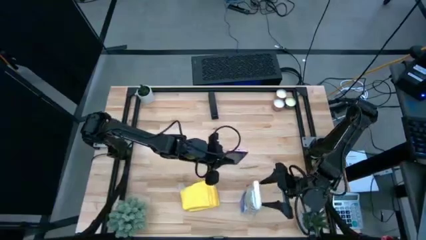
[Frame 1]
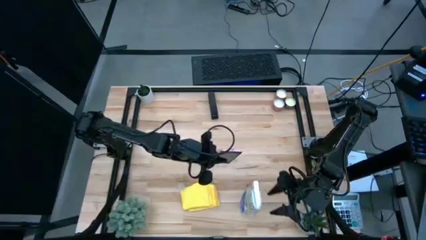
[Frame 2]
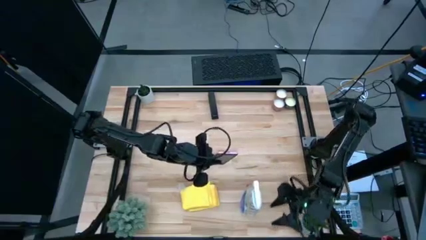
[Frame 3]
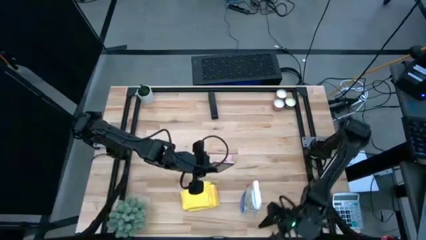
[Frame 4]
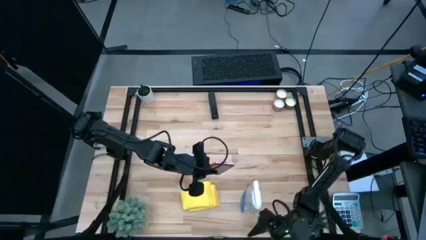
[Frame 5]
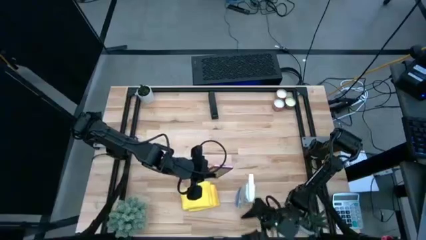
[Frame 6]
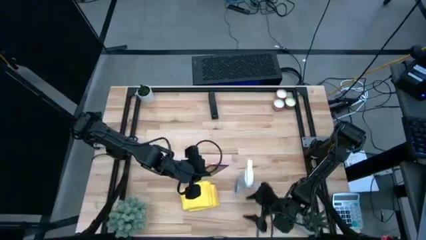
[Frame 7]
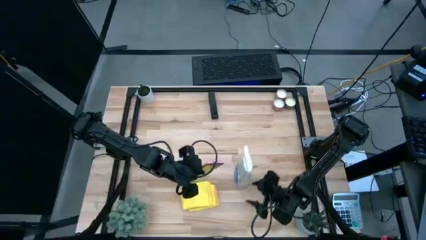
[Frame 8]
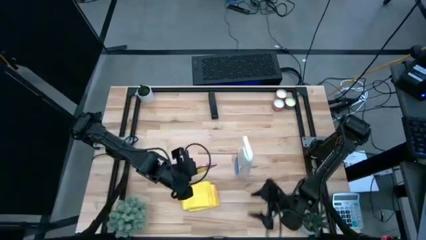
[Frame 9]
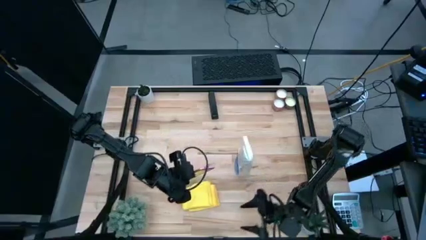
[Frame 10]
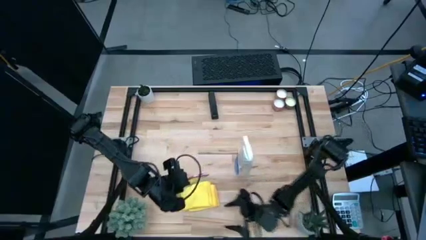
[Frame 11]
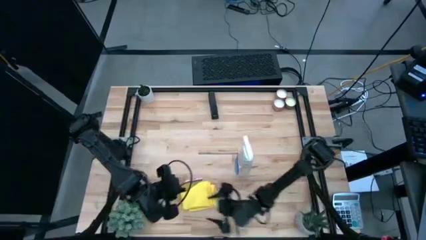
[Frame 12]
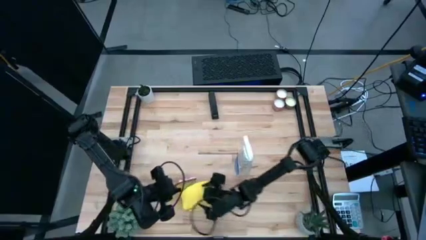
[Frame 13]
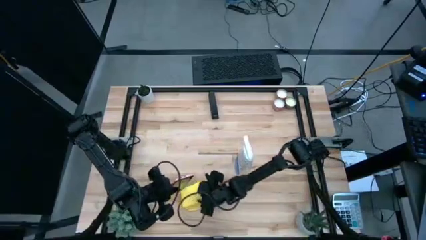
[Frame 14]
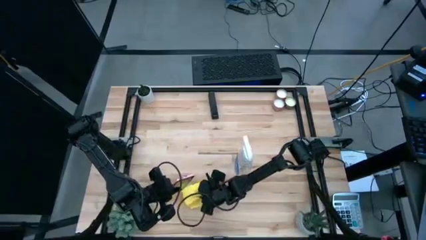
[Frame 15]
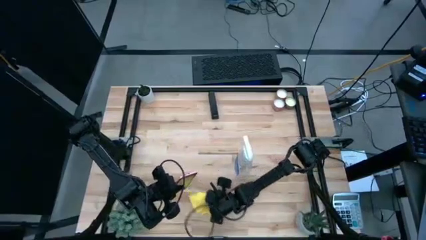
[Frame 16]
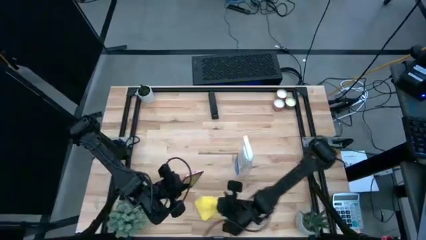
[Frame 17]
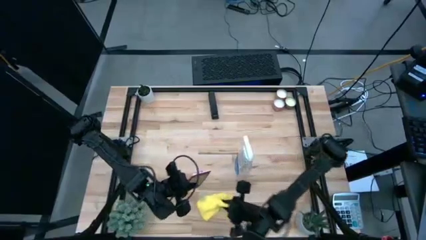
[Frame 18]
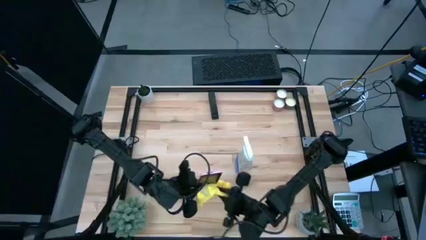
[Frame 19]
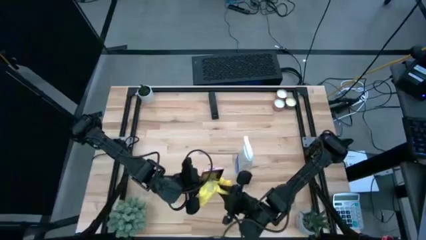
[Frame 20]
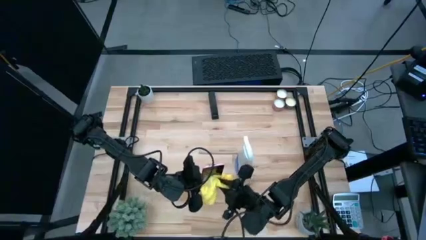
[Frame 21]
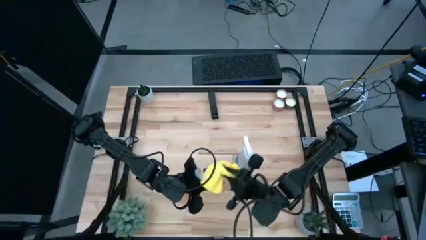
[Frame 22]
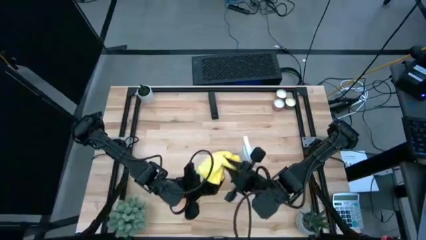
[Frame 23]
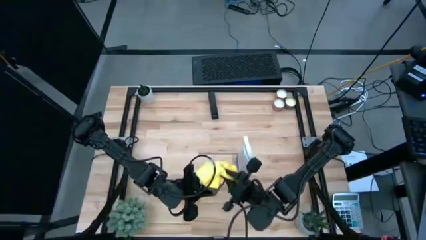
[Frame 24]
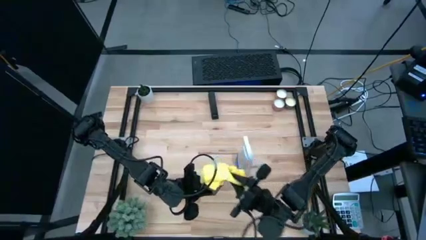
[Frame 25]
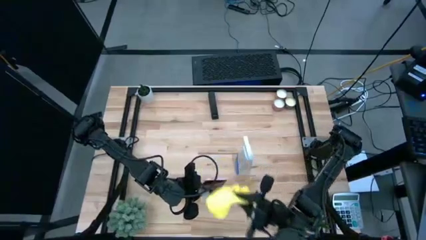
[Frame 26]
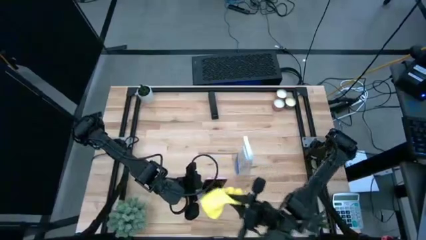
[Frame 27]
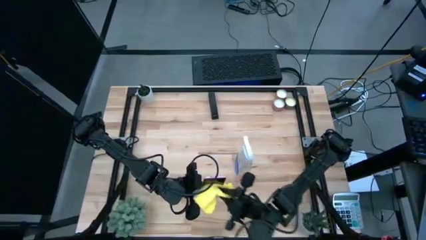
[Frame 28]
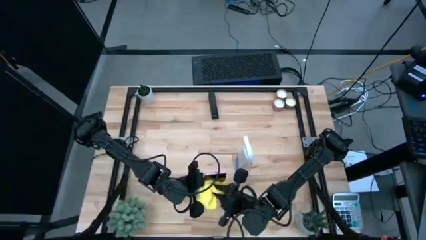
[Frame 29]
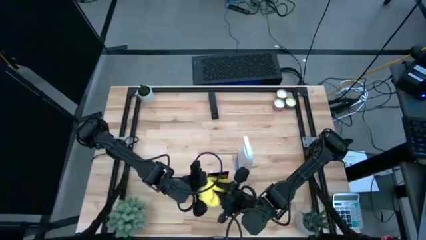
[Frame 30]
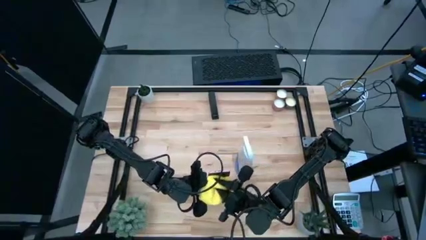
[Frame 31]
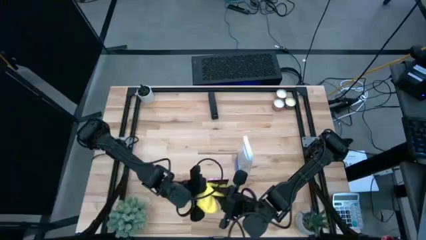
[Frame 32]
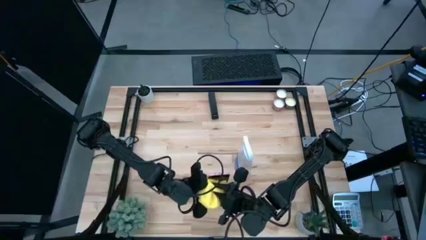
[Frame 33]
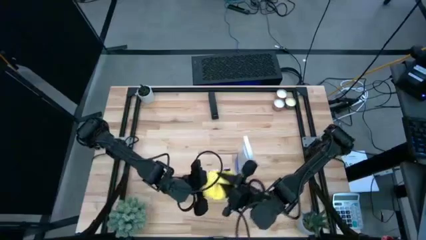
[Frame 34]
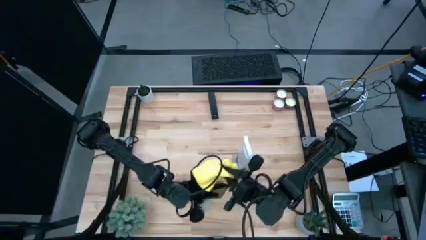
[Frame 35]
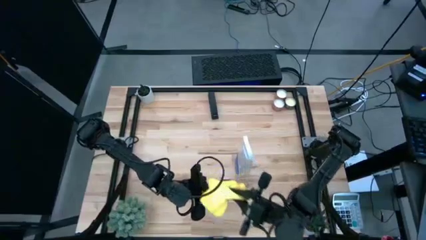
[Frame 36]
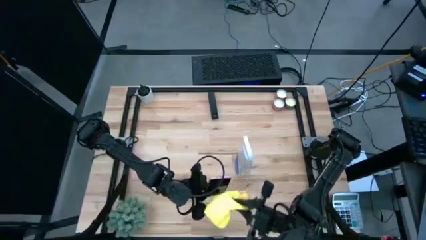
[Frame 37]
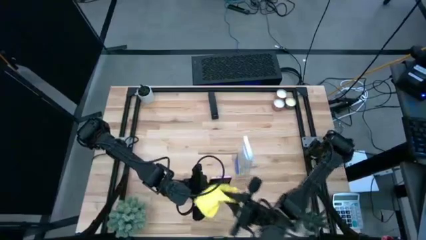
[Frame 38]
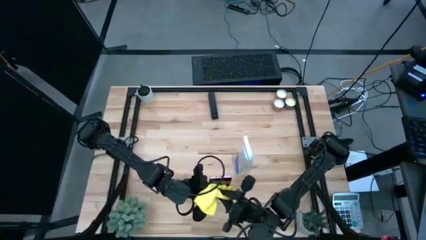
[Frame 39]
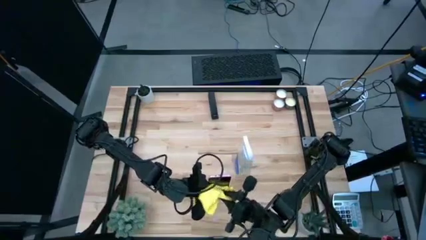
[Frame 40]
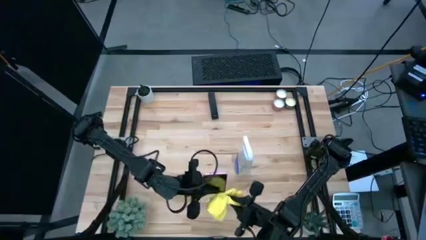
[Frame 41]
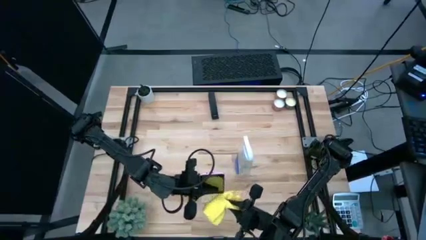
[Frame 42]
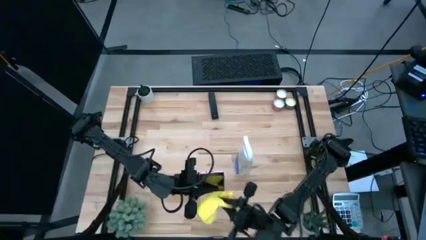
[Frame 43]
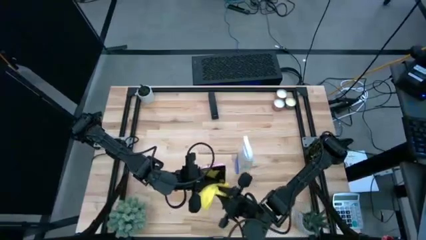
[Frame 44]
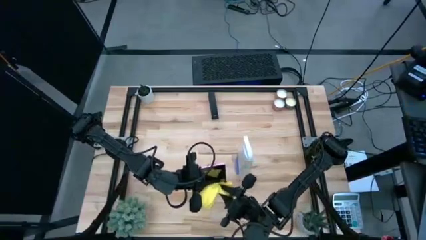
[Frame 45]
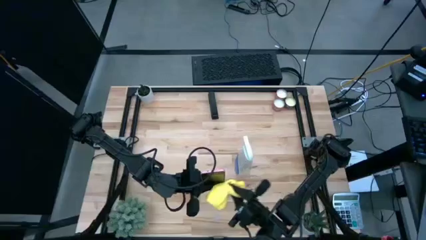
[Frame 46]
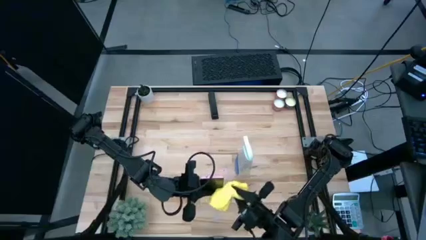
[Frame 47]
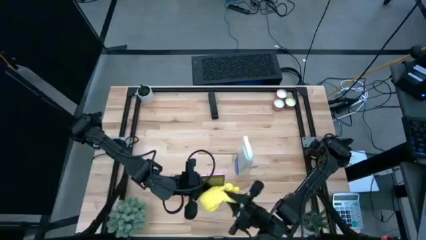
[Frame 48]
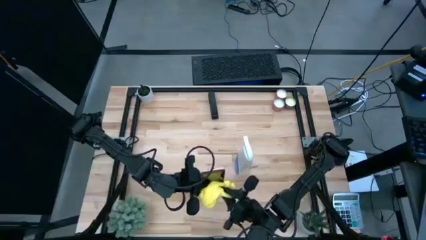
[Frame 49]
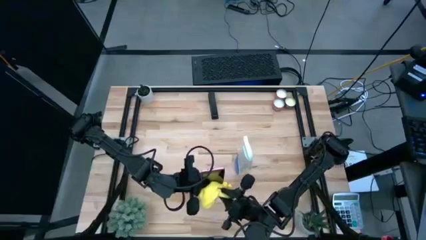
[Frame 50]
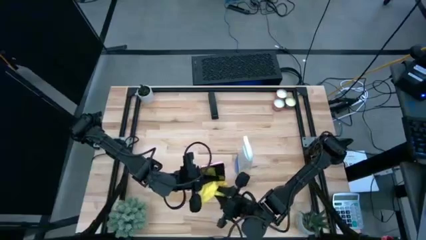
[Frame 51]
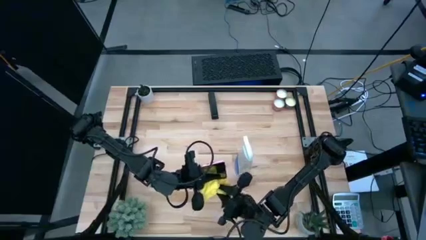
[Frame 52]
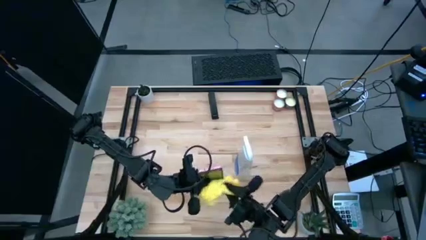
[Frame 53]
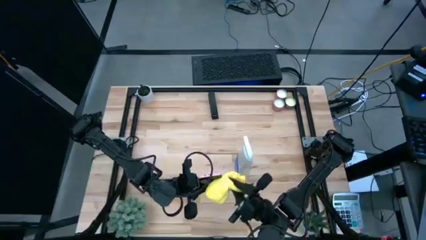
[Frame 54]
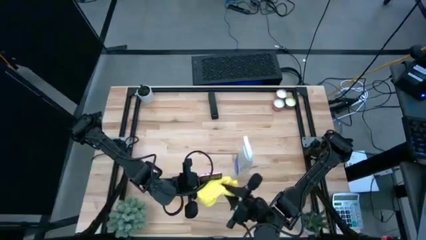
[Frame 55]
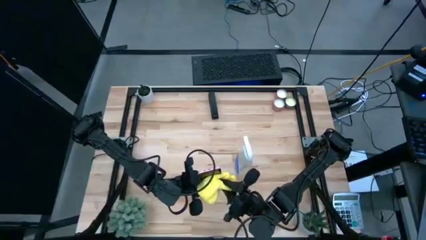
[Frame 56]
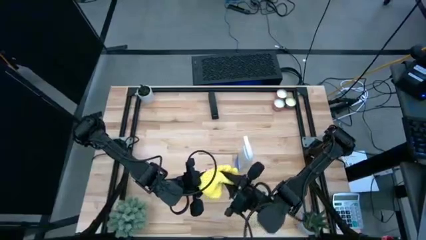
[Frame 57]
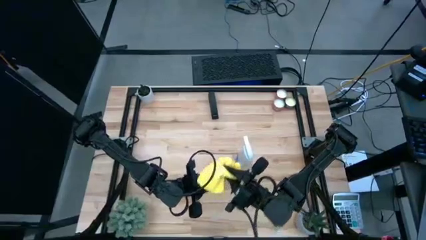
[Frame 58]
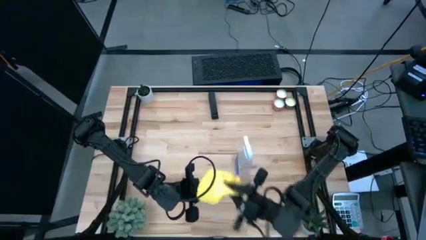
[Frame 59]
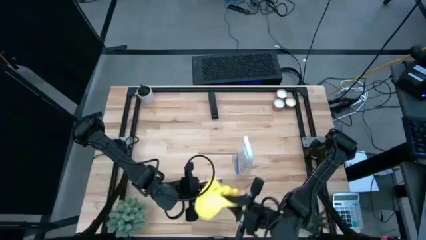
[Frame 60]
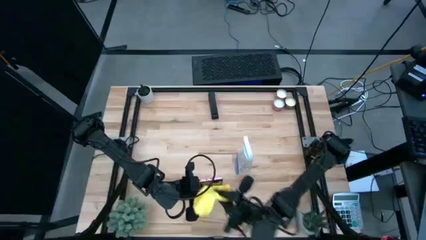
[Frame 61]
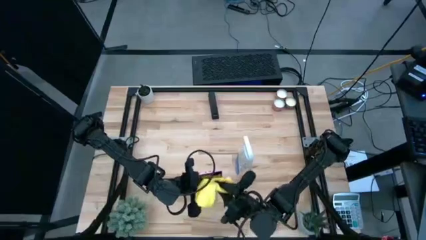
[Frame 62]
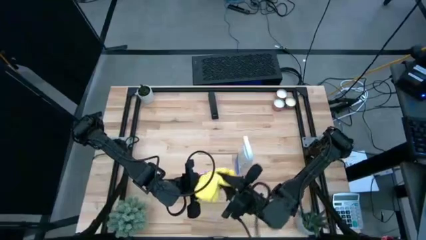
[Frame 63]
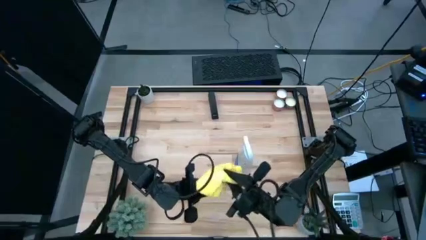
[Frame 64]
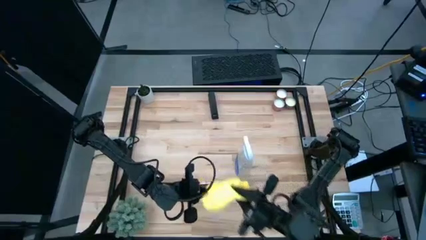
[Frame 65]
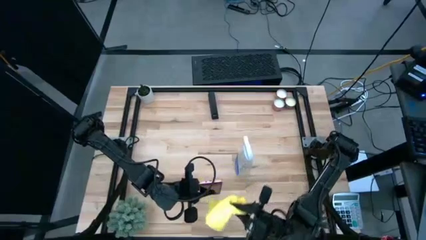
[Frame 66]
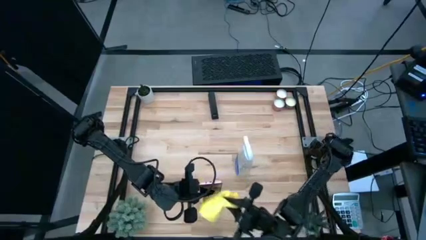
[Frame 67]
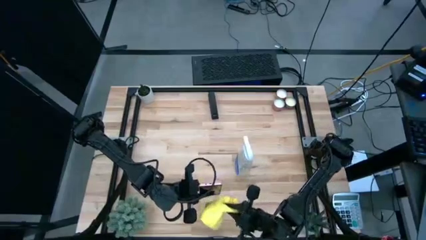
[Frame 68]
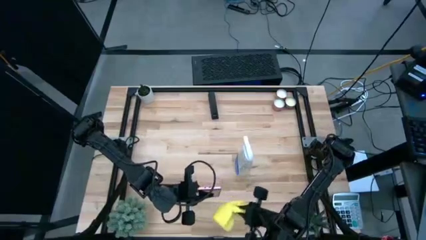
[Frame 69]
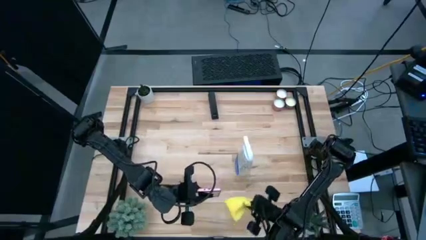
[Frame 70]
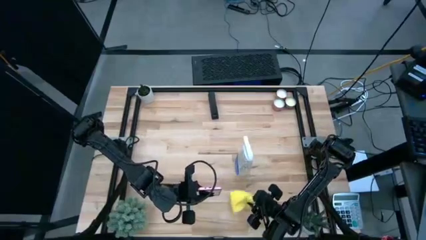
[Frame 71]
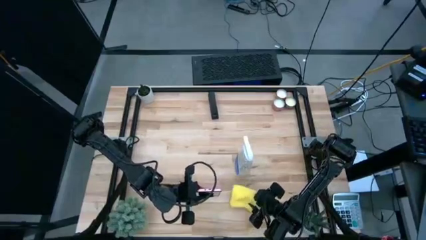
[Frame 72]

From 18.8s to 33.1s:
Task: Apply microfiber cloth
Wipe the front of the pink cellphone with a yellow microfiber cloth

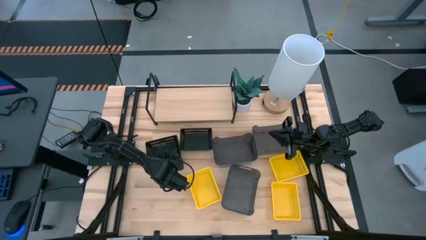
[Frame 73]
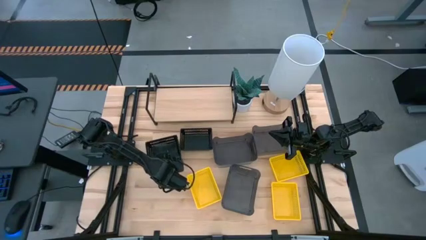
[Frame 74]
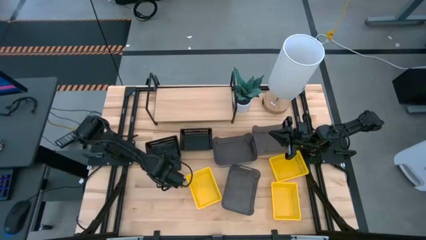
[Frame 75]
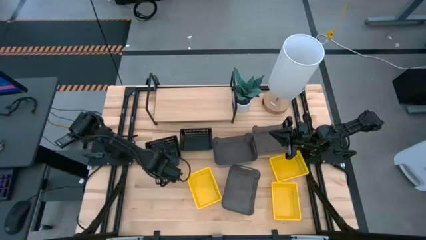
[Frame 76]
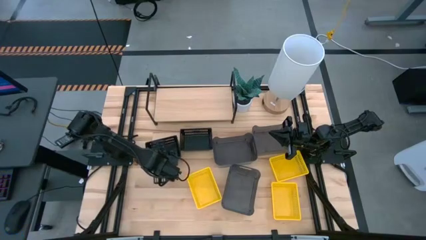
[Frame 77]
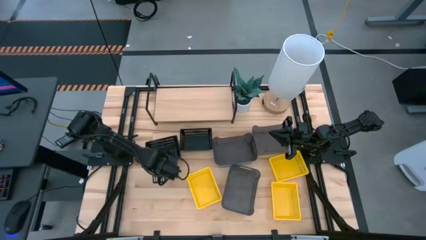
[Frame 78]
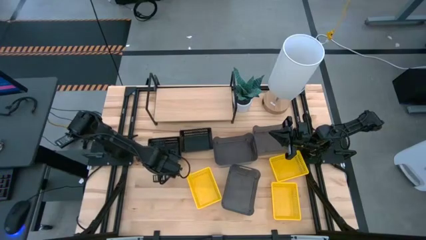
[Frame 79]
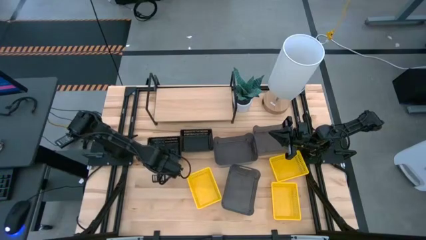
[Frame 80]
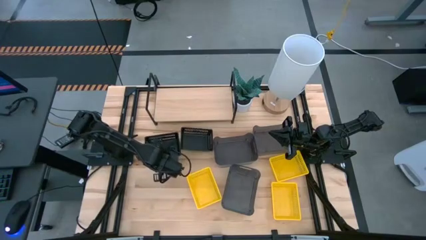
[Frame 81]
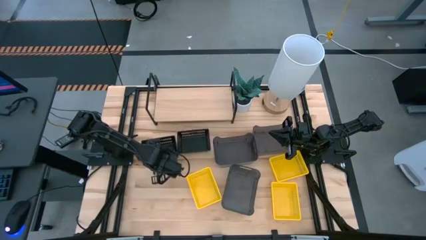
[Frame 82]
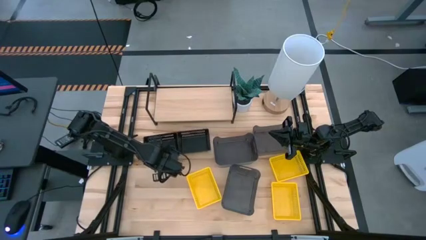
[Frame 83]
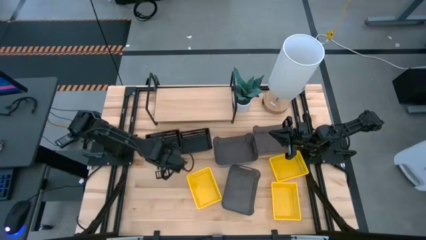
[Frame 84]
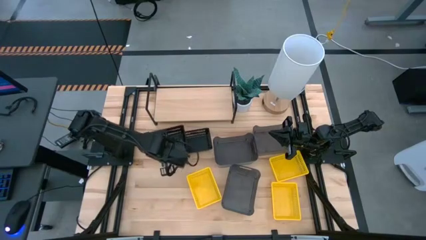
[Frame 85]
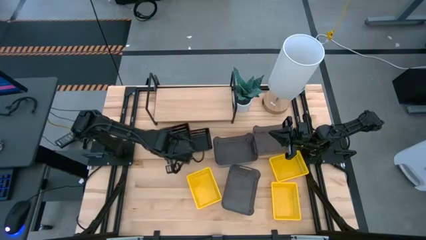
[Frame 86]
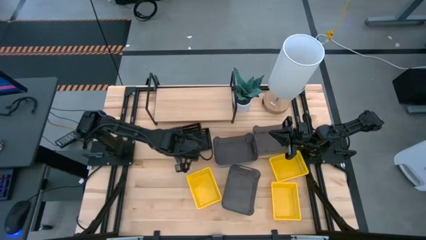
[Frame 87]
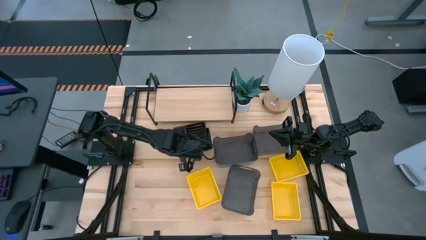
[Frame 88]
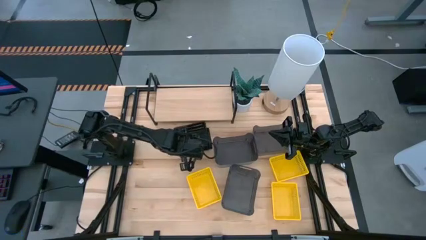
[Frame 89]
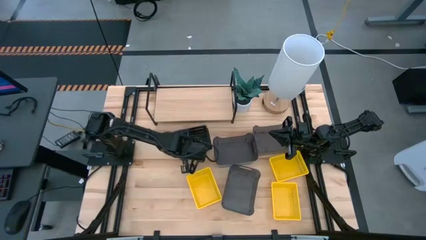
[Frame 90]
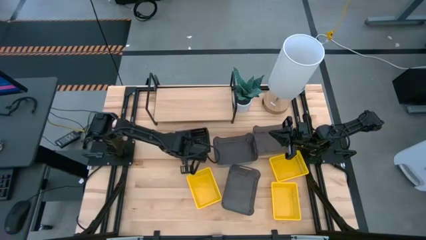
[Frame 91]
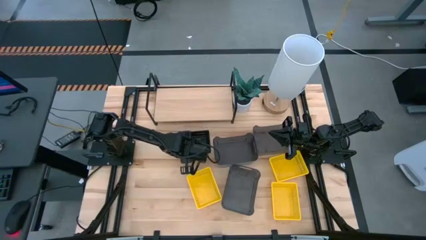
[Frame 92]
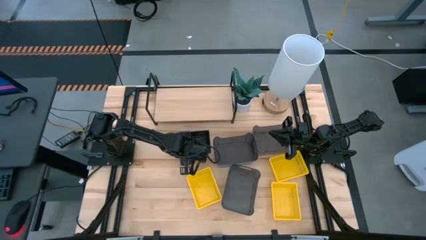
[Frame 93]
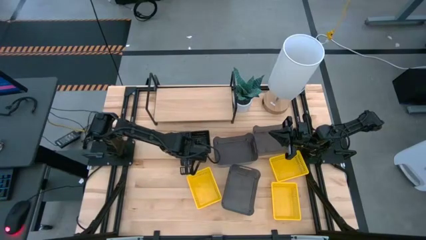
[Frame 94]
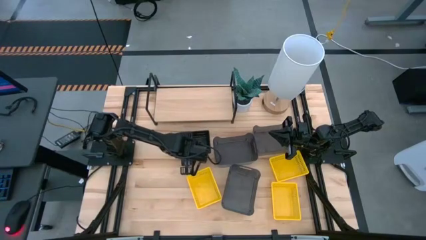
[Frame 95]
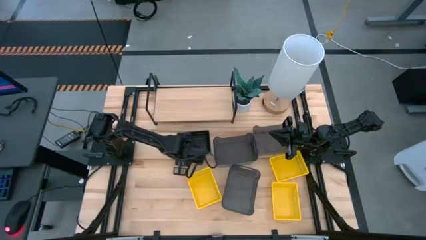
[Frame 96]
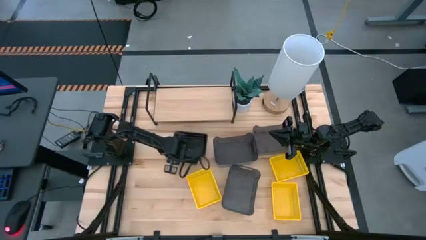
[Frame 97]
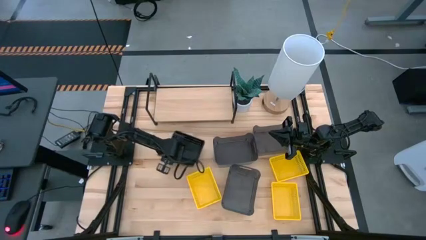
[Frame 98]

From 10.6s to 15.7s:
Task: Stack baskets on shelf by color
Stack the stacked left black bins on the right black bin
